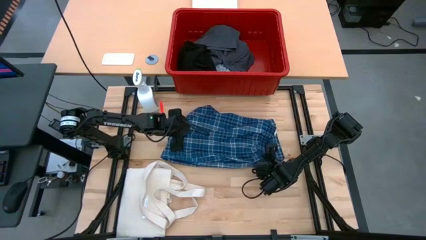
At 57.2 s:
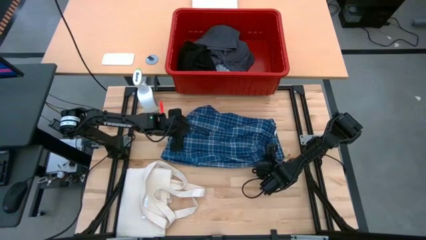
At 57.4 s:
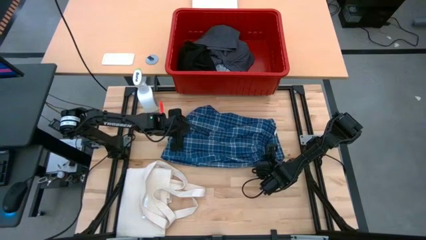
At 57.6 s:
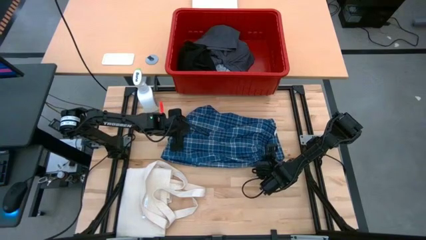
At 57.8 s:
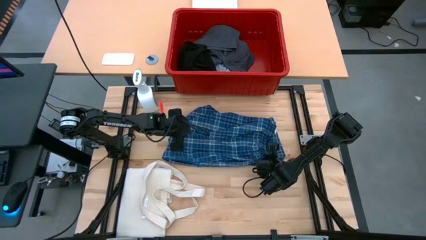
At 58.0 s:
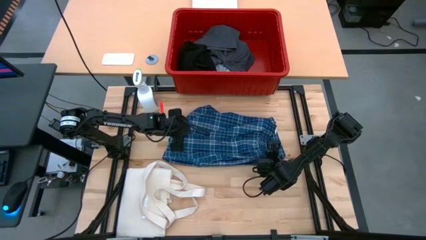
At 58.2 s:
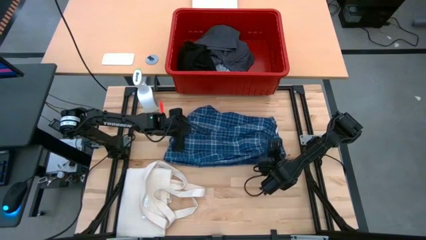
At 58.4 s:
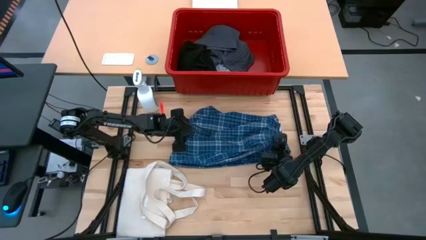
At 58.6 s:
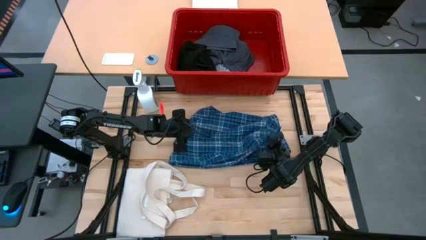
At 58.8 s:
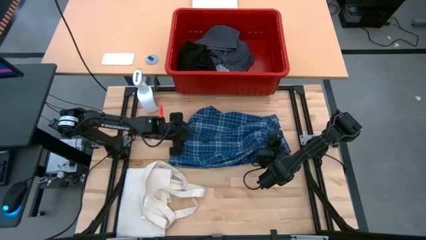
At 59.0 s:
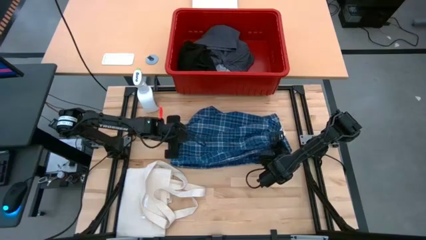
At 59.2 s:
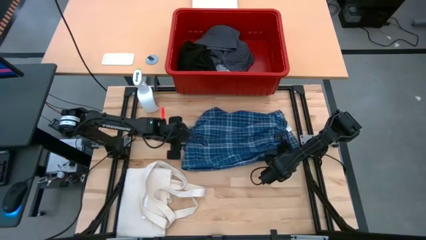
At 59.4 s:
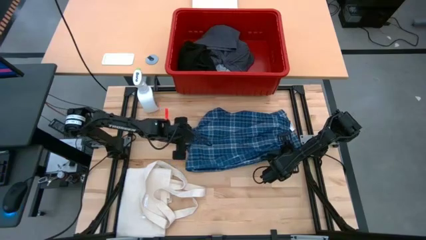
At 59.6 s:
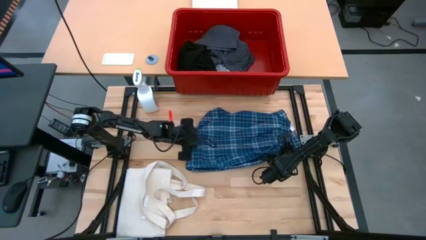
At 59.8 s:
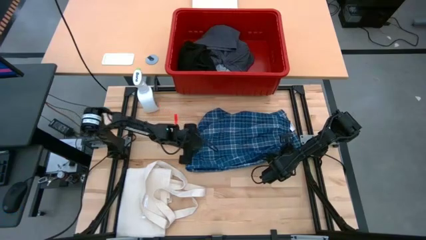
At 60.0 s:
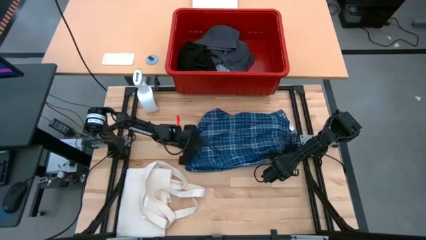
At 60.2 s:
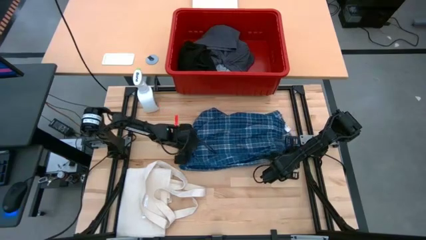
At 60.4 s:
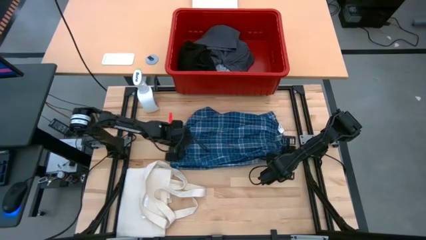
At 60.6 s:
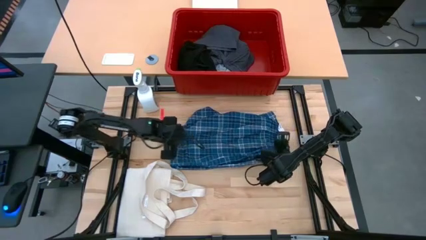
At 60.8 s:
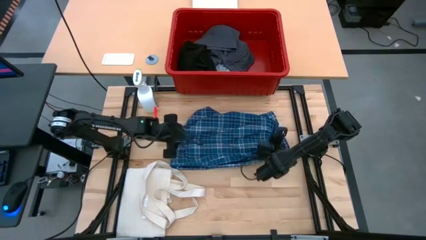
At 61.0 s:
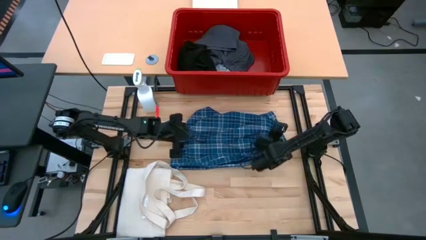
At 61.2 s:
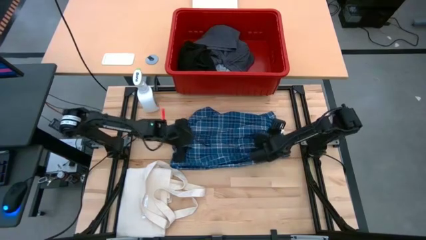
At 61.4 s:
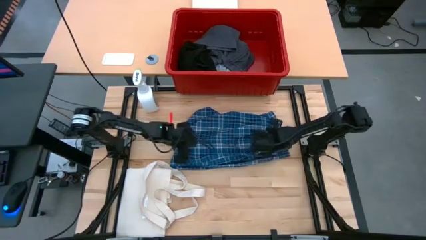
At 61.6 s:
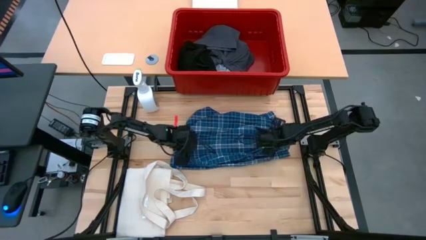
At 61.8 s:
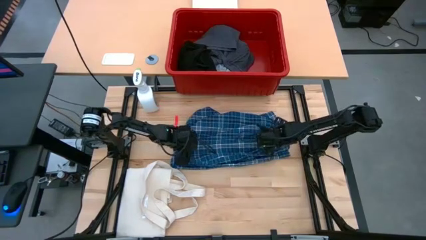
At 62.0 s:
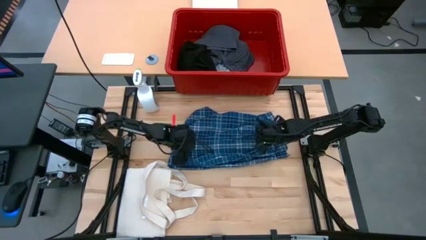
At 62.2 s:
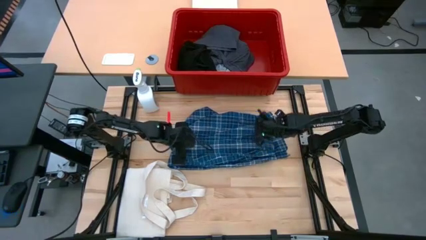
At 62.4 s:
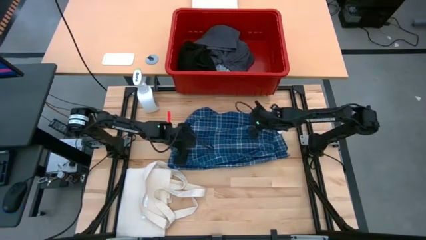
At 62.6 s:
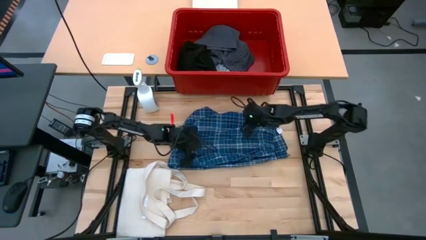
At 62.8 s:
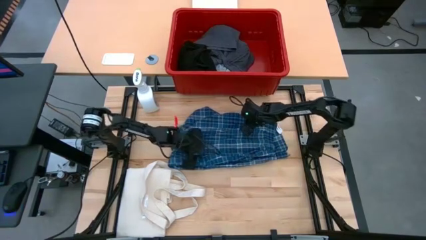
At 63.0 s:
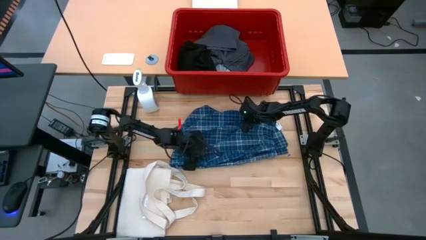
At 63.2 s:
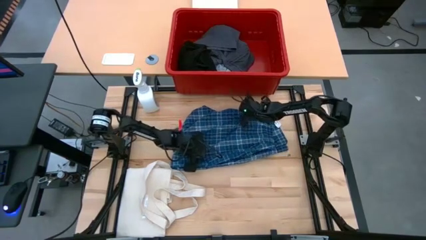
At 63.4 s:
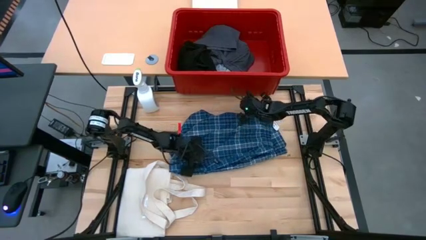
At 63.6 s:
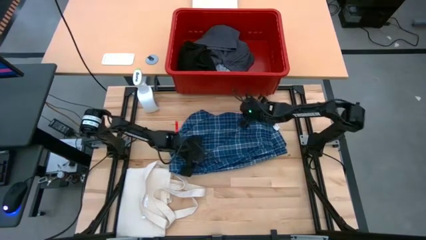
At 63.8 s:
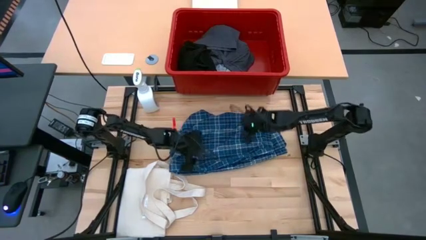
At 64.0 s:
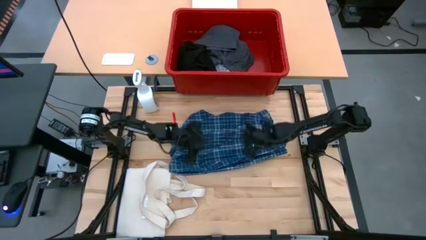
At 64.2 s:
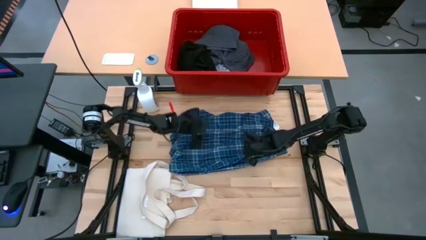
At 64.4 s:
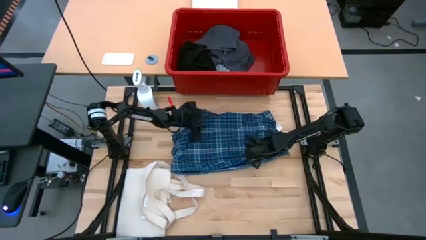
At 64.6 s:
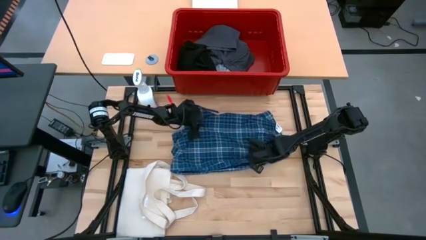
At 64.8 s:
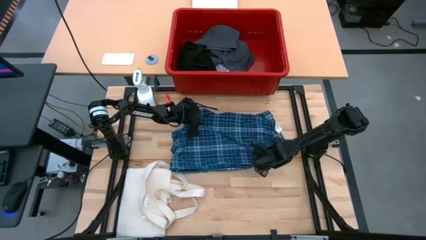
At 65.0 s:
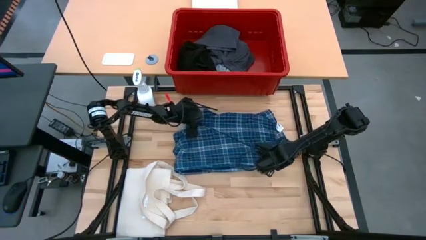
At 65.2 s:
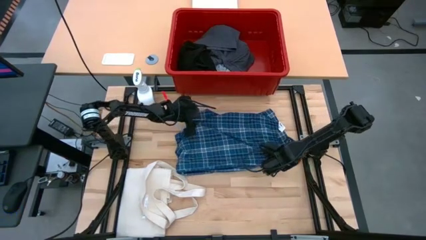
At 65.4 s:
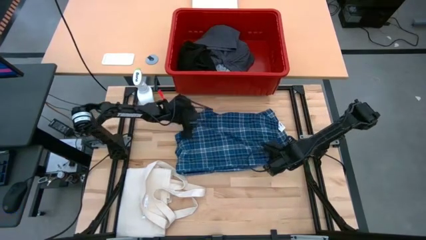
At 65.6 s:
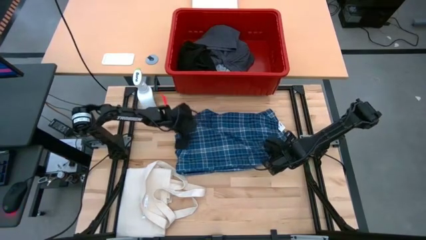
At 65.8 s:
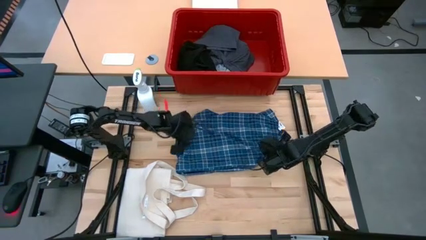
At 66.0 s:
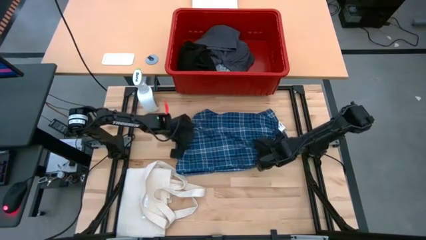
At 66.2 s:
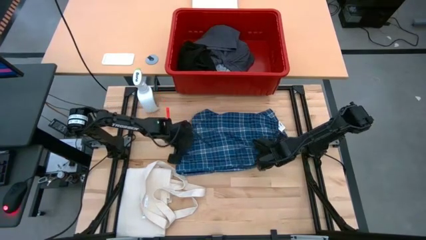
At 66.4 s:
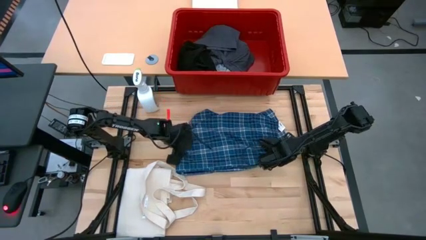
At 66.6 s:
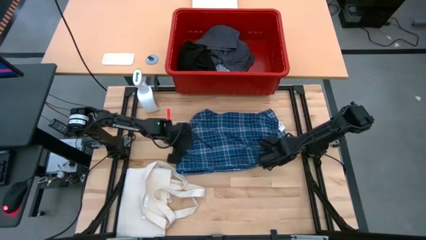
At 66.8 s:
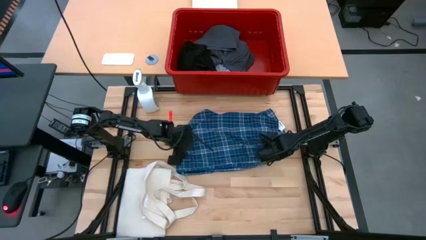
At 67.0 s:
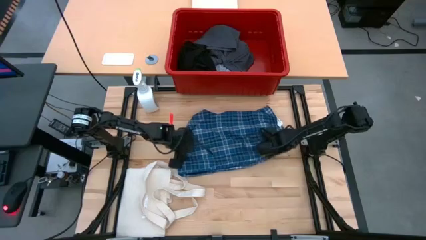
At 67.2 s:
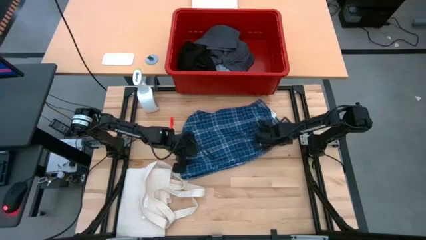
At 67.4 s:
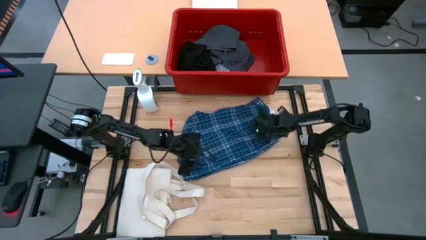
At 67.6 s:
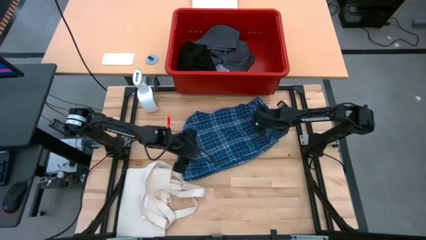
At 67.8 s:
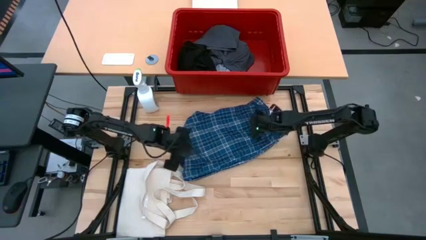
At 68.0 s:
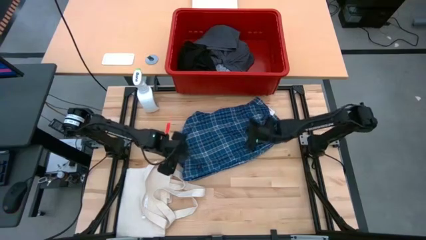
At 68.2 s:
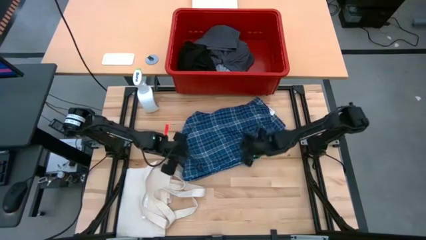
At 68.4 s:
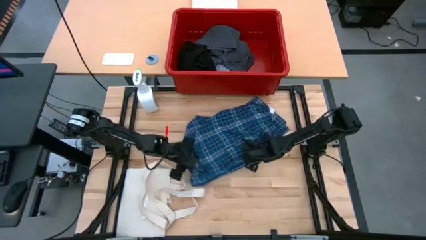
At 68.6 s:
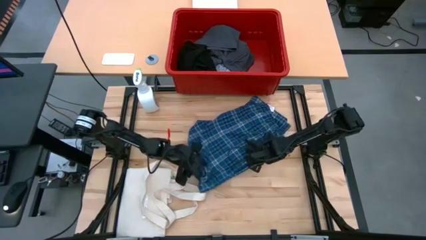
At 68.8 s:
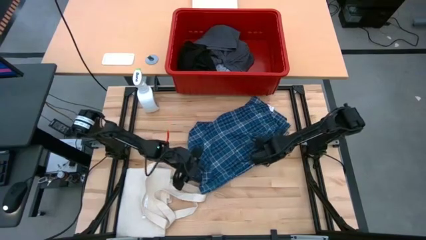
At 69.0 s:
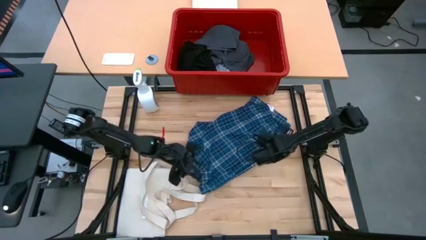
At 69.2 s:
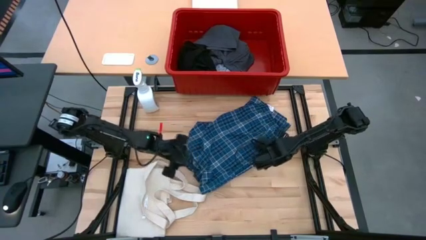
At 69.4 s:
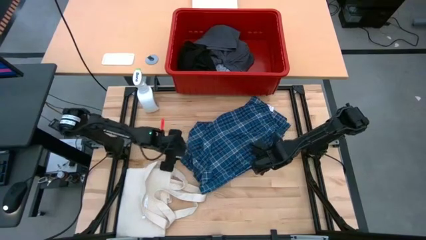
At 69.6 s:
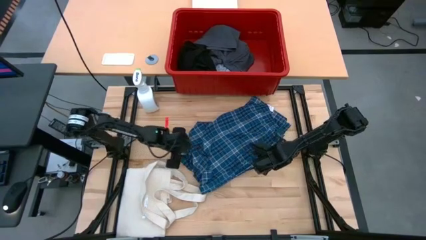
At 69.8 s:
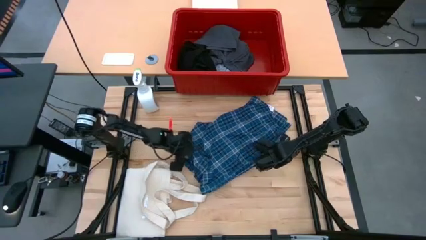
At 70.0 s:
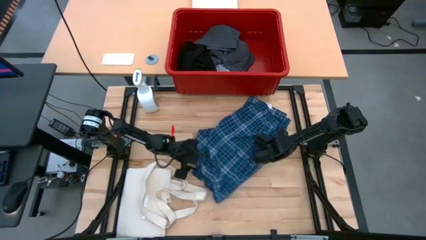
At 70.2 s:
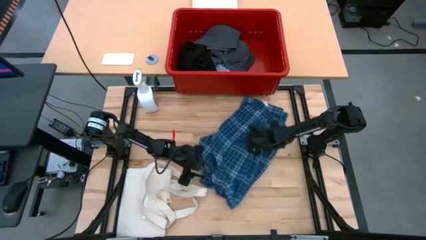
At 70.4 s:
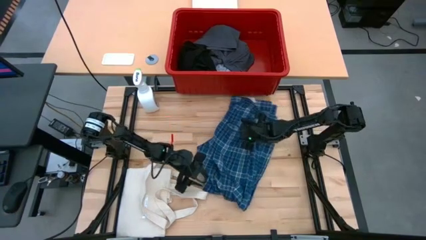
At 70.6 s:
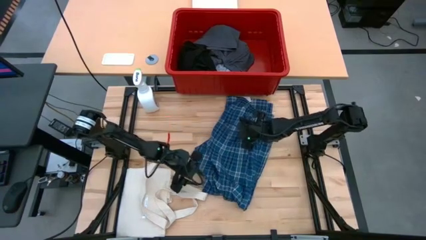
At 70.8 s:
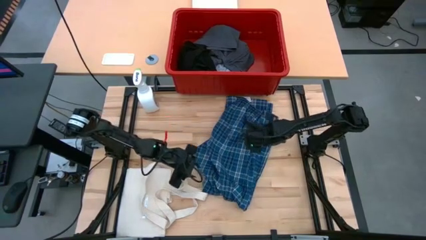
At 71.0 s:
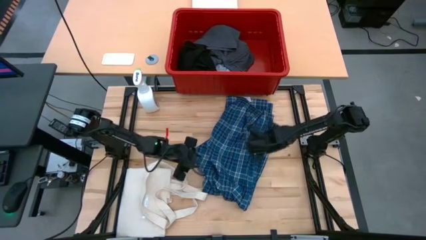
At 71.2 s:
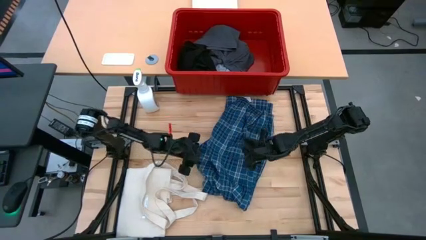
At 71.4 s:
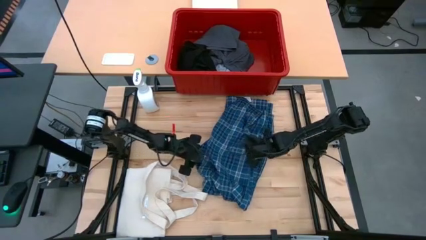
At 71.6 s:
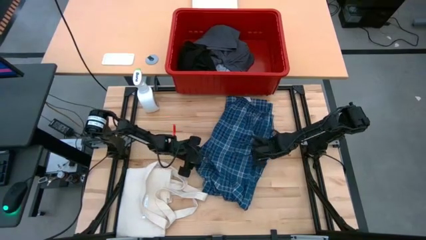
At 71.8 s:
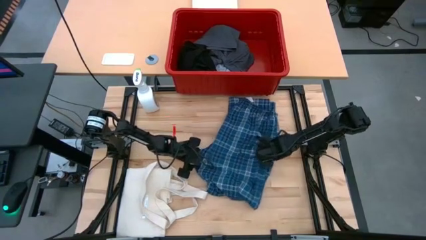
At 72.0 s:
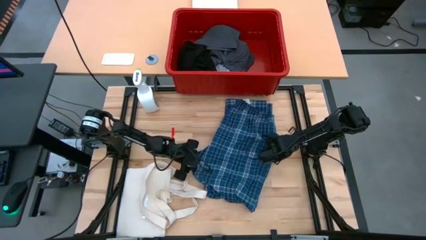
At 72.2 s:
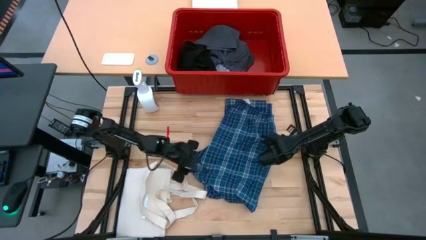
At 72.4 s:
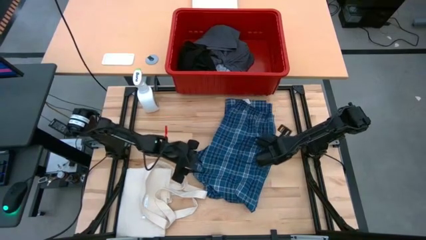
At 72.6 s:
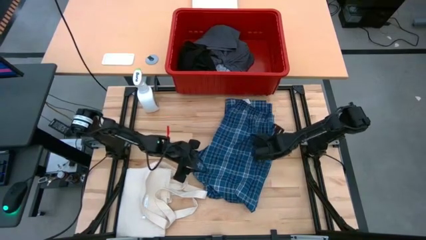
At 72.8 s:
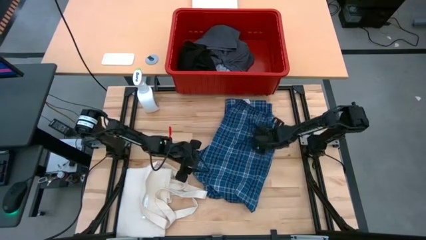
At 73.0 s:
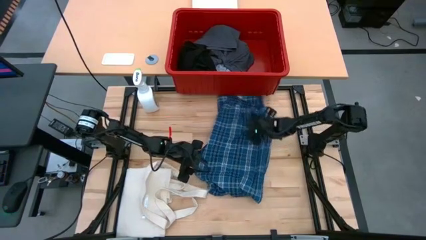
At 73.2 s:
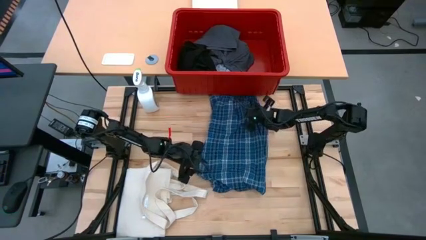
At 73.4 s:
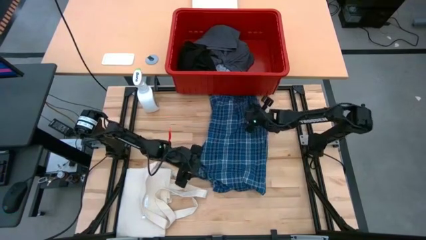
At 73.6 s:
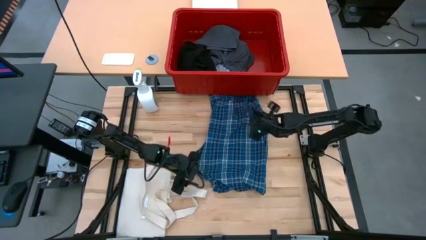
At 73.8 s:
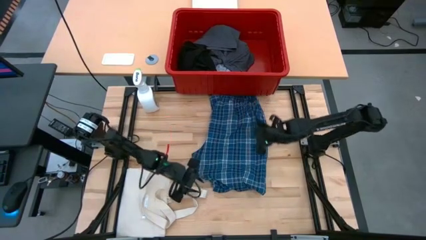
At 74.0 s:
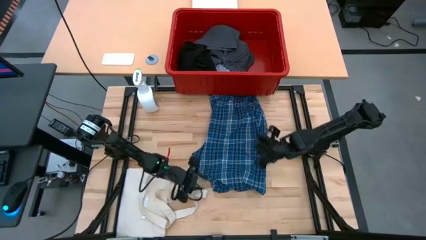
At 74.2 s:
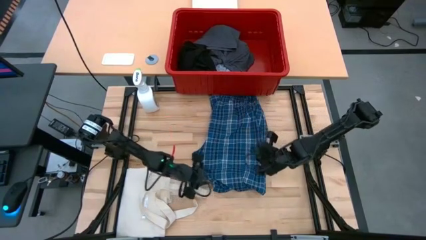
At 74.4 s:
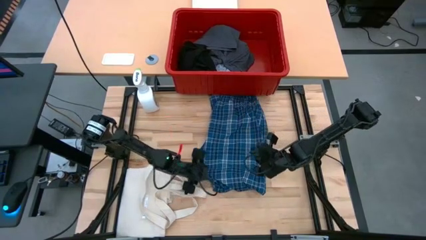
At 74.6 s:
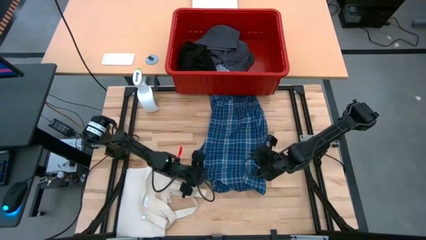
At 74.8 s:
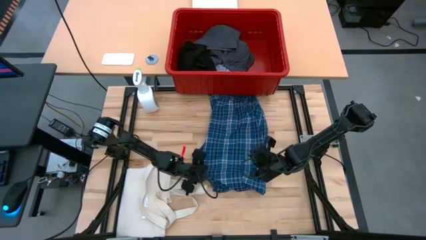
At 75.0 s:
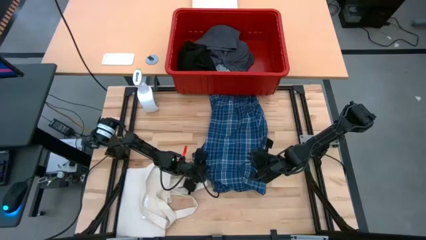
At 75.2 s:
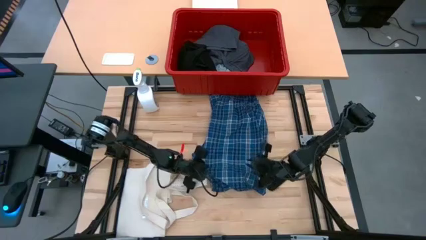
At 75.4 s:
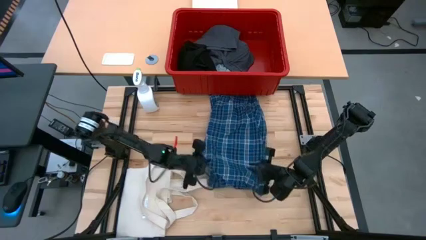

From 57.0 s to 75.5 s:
Task: Fold Laundry from Bin
Fold the blue pants
